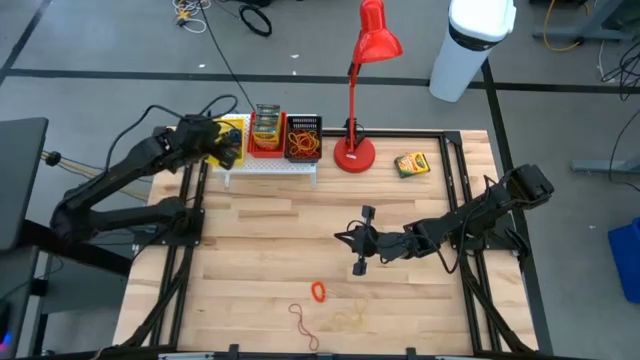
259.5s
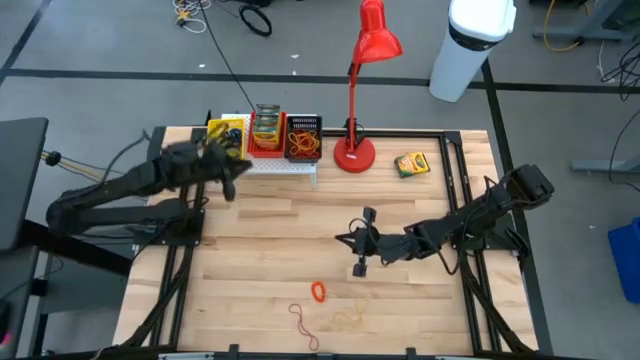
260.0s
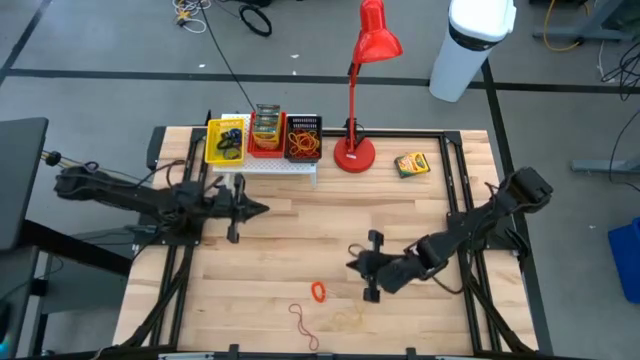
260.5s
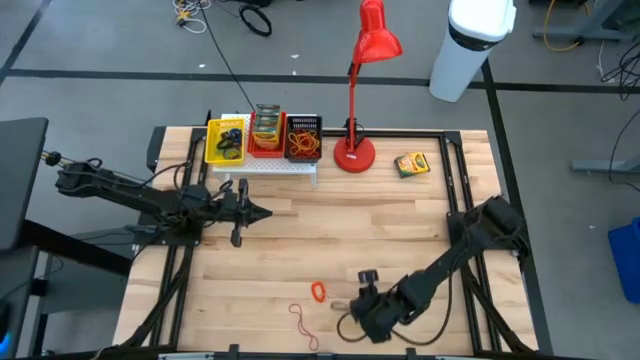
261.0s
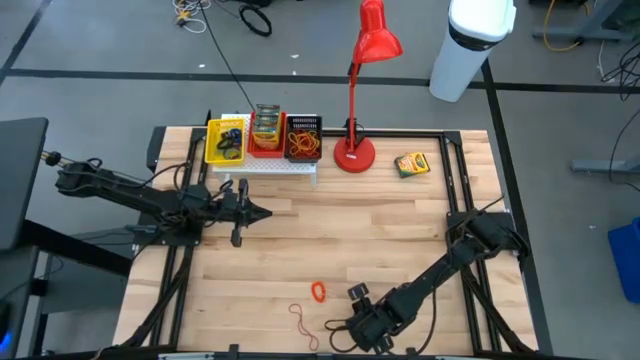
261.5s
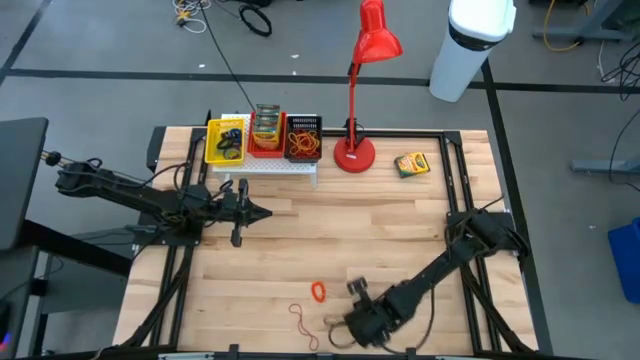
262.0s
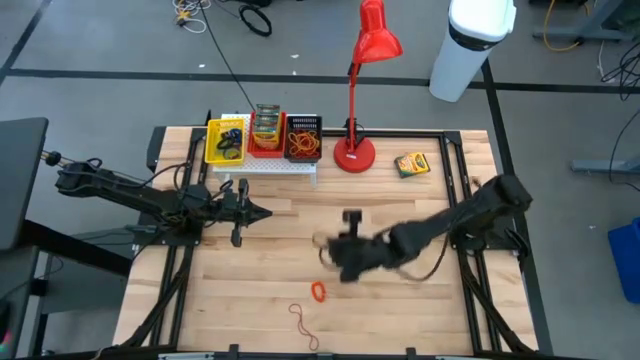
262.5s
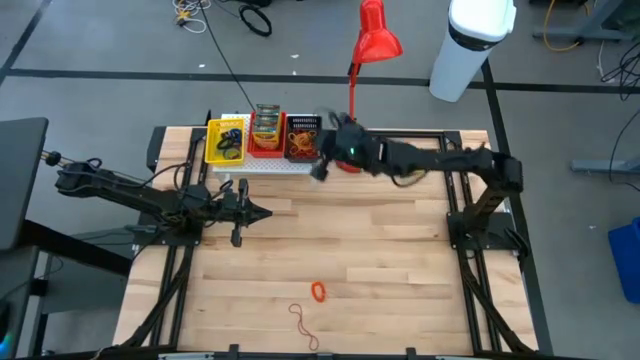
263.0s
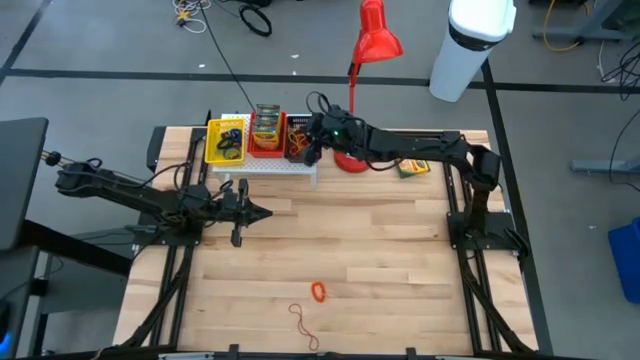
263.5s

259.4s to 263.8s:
Task: Pick & Place Office Desk Supplies
Put the yellow rubber band into the black bin on the shelf

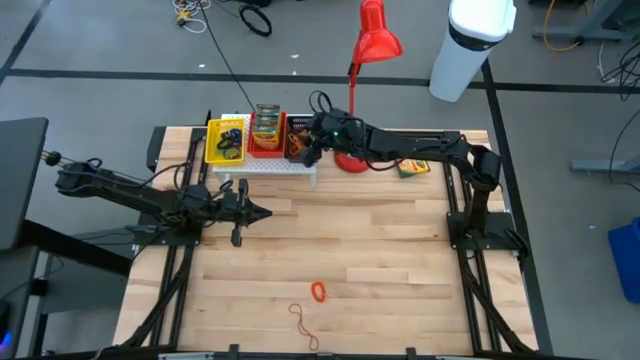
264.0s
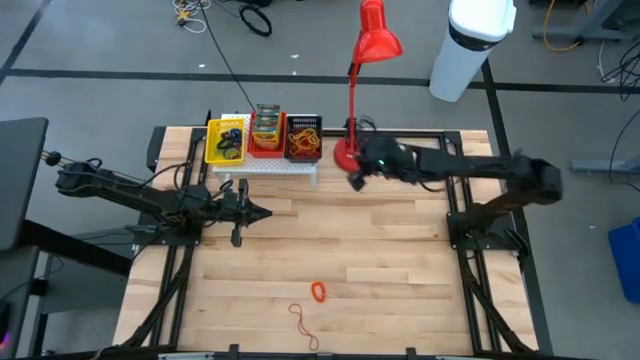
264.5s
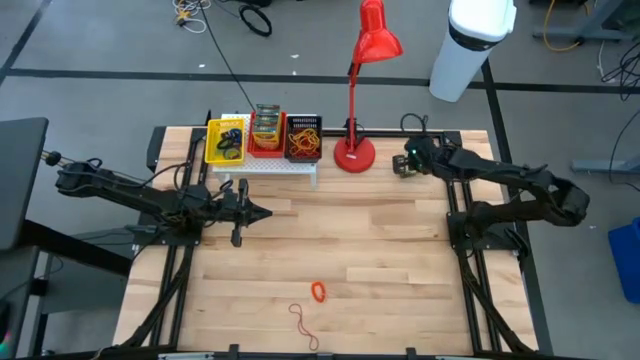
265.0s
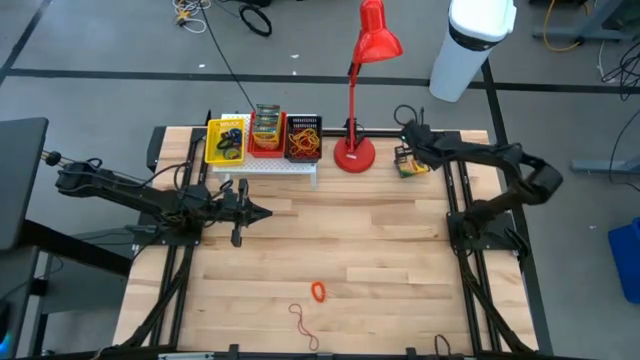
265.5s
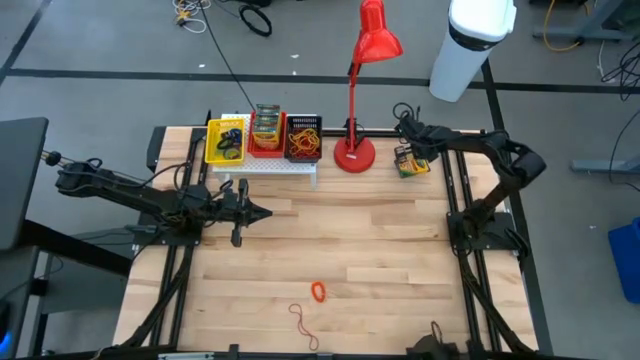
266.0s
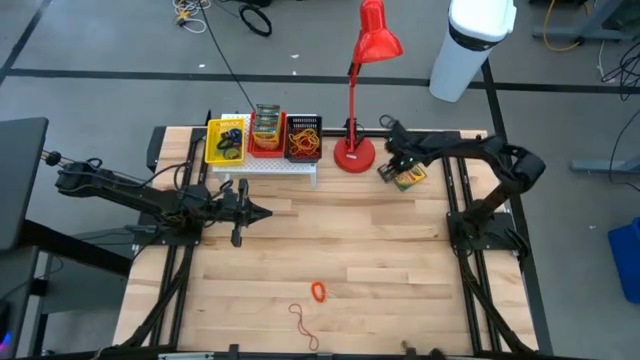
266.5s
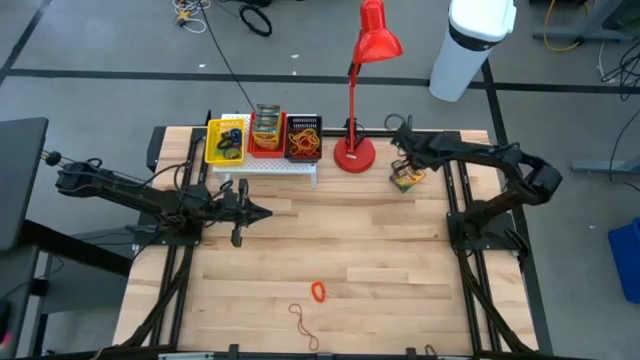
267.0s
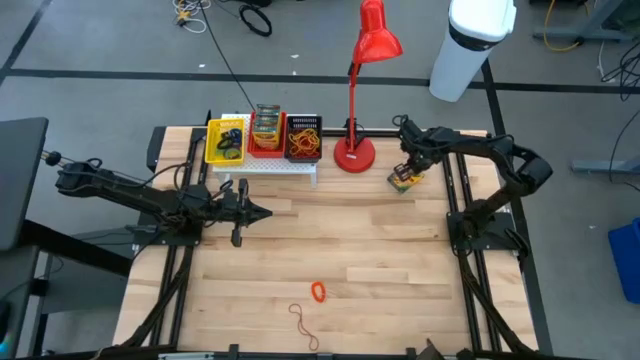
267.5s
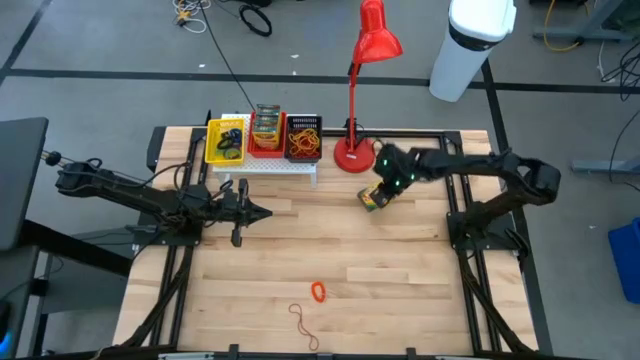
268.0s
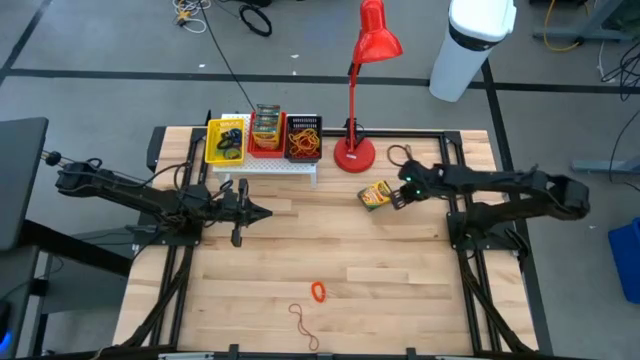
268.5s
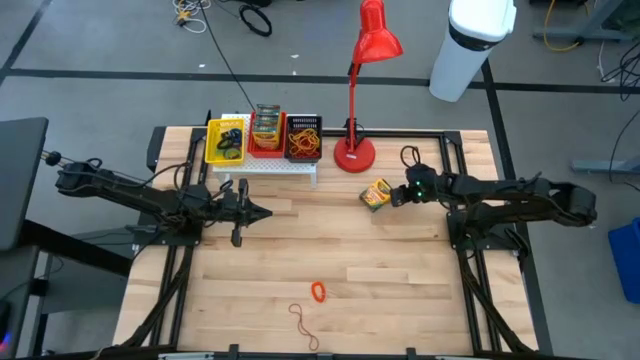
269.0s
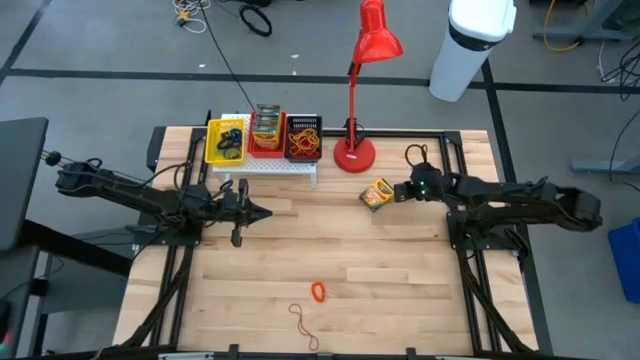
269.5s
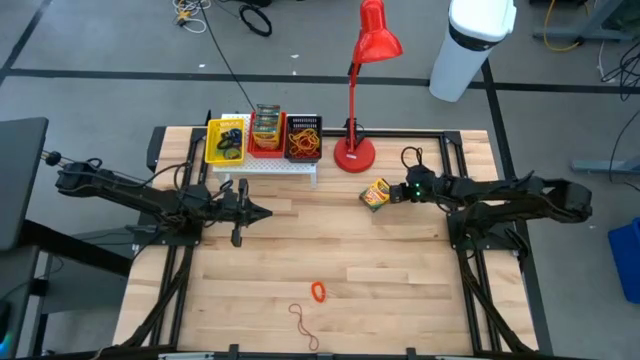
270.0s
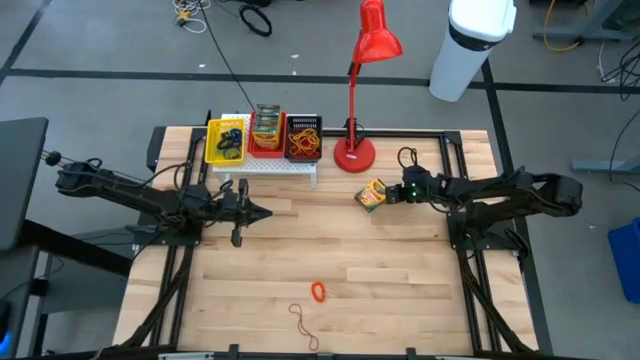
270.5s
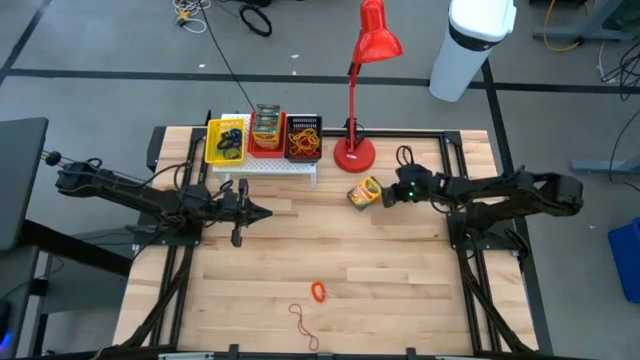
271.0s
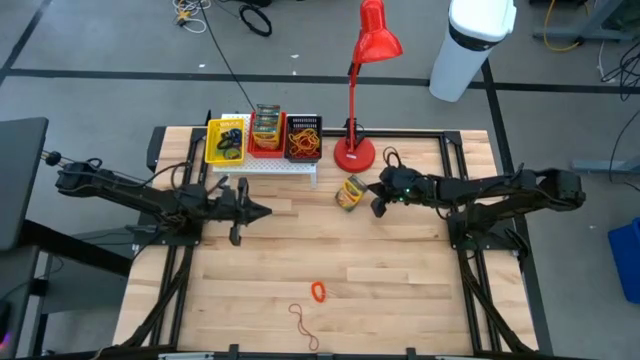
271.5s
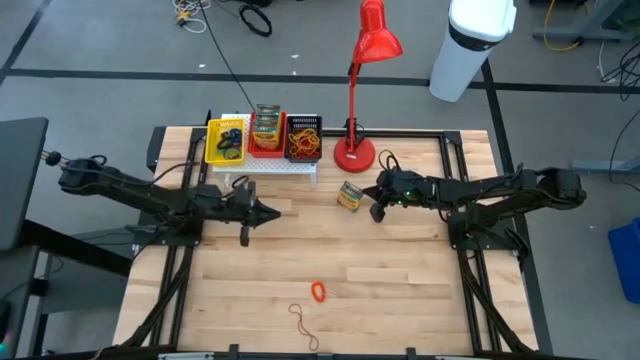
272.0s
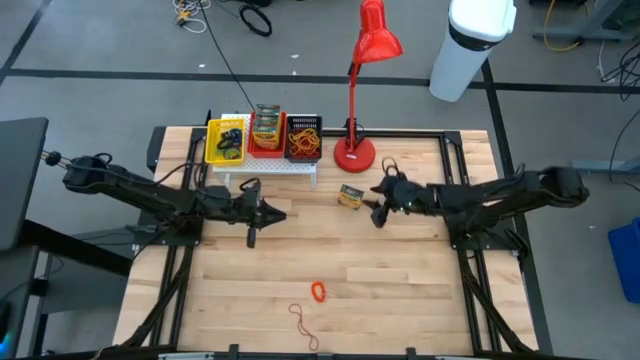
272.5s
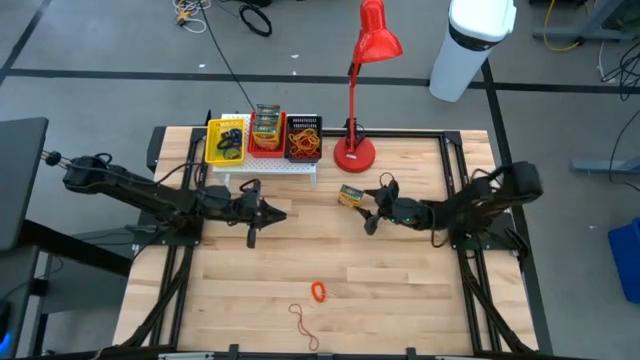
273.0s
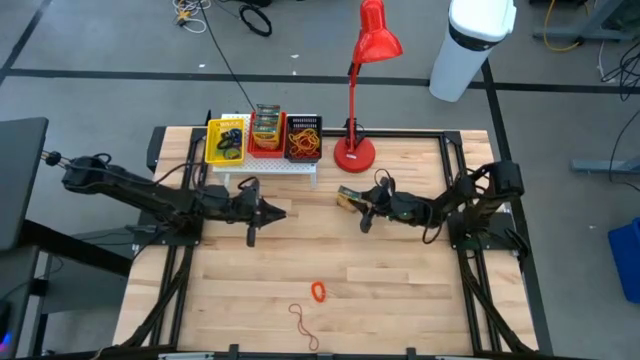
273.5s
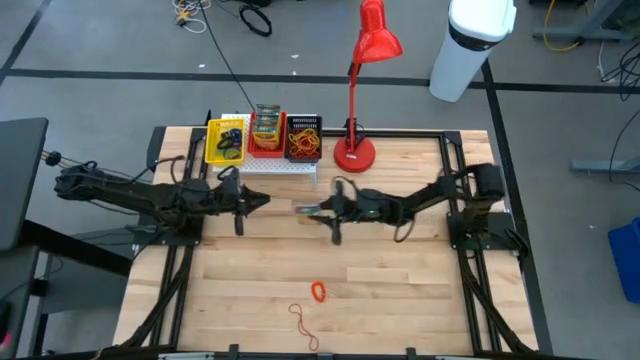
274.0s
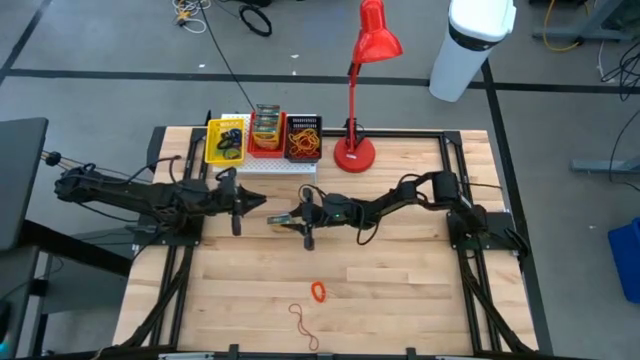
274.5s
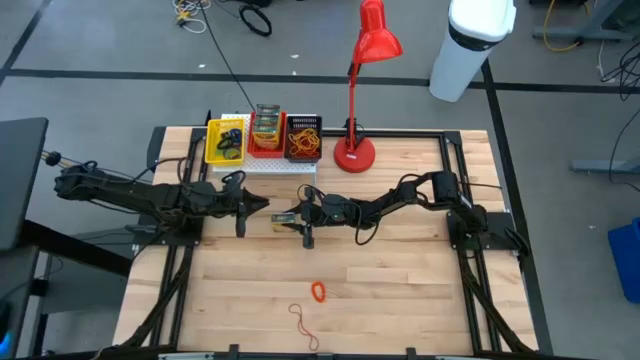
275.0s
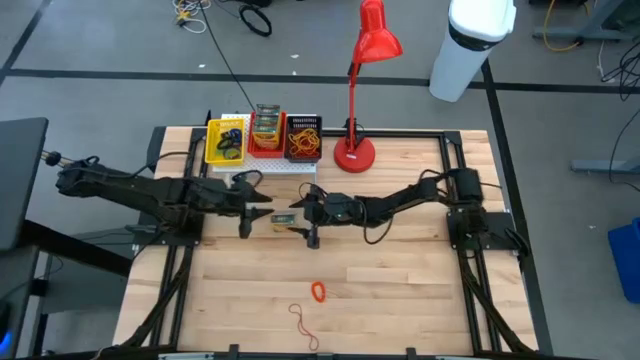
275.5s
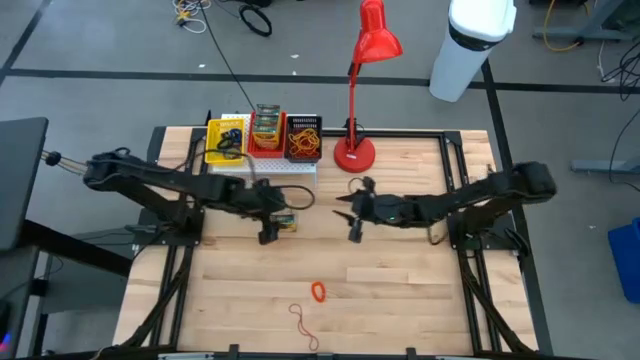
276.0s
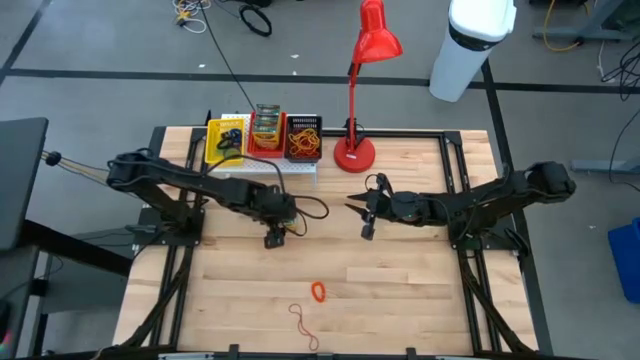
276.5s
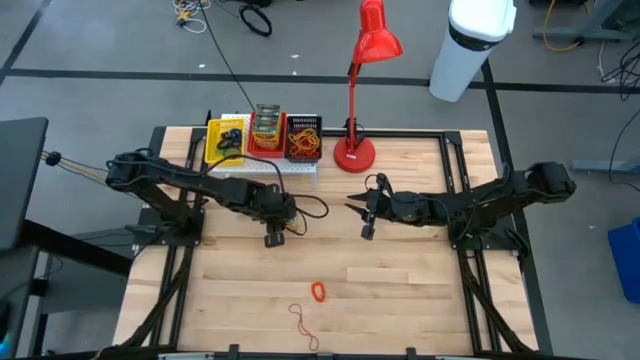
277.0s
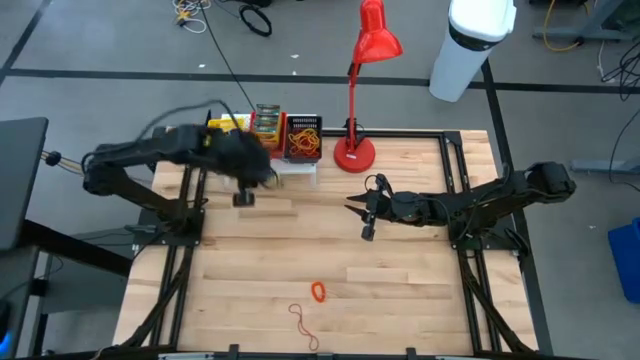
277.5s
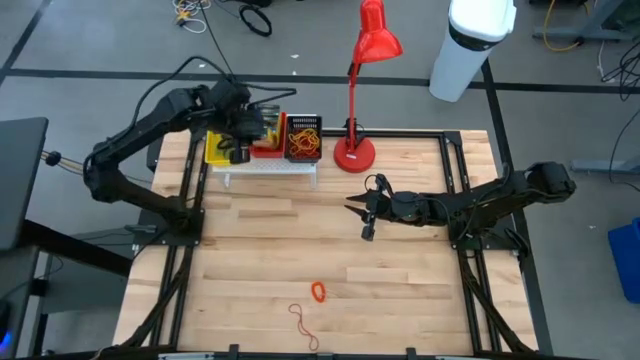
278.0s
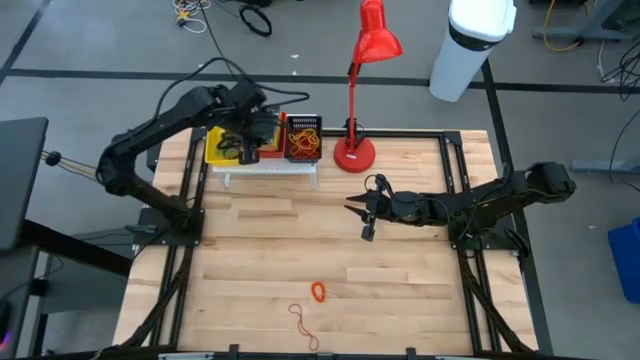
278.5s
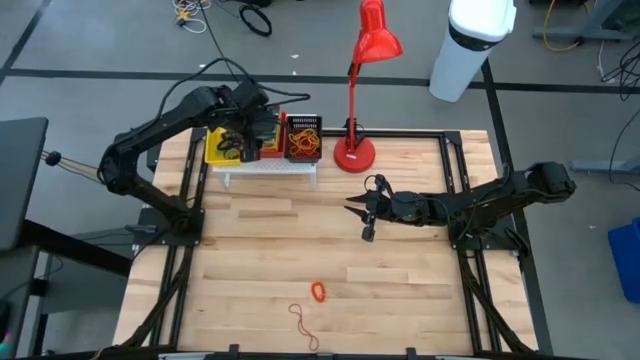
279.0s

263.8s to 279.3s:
Put the crayon box into the red bin on the shelf

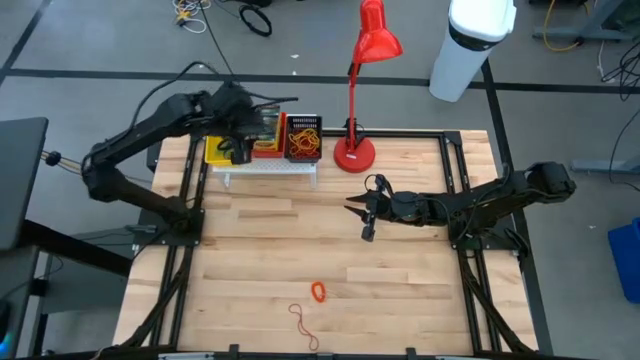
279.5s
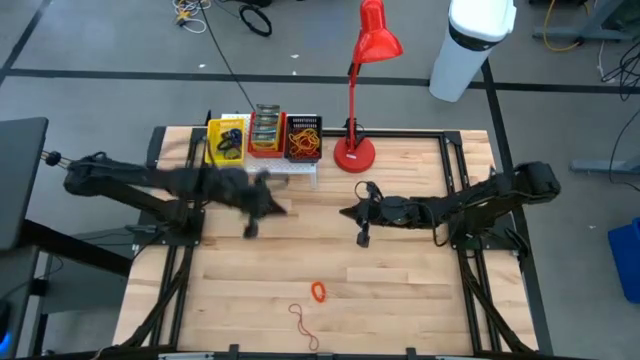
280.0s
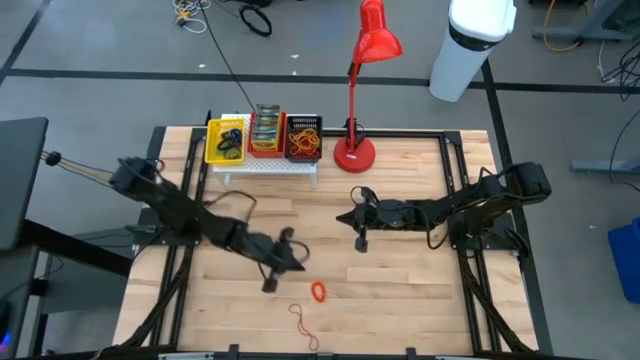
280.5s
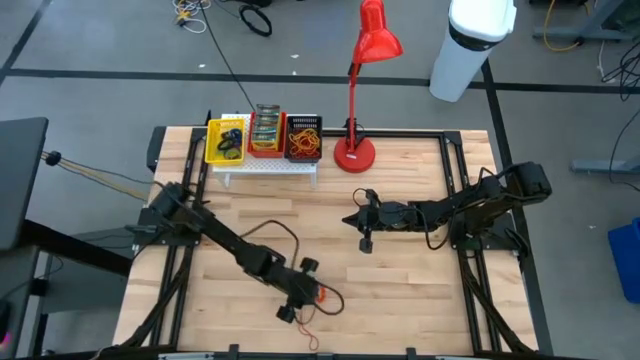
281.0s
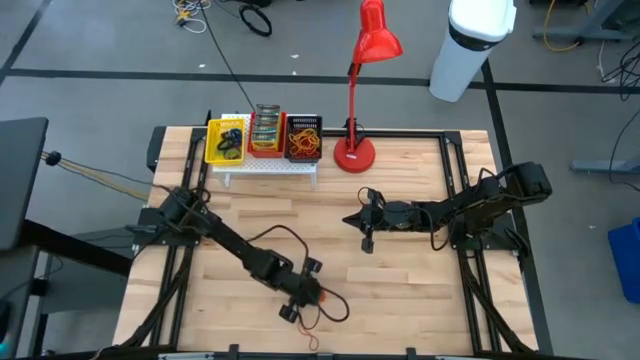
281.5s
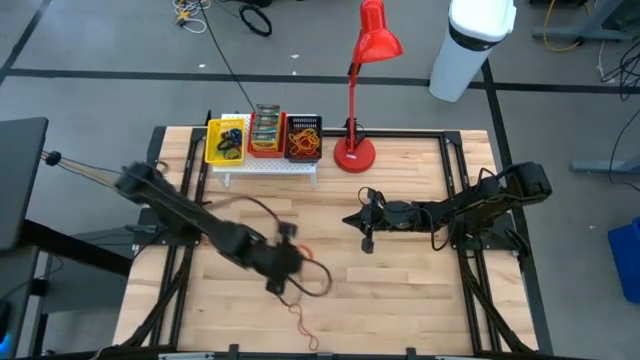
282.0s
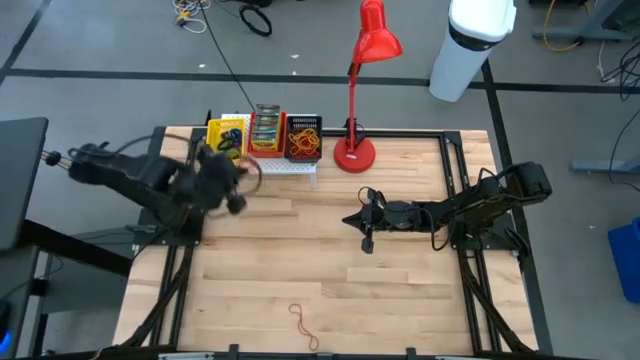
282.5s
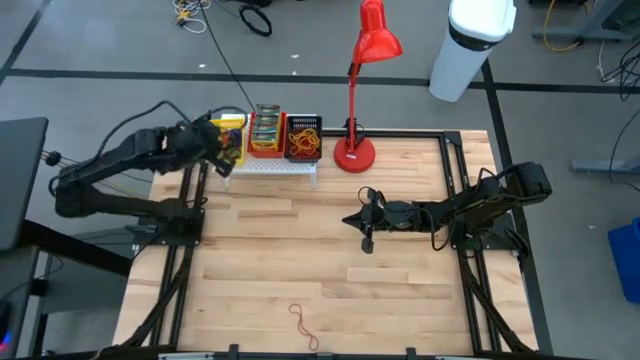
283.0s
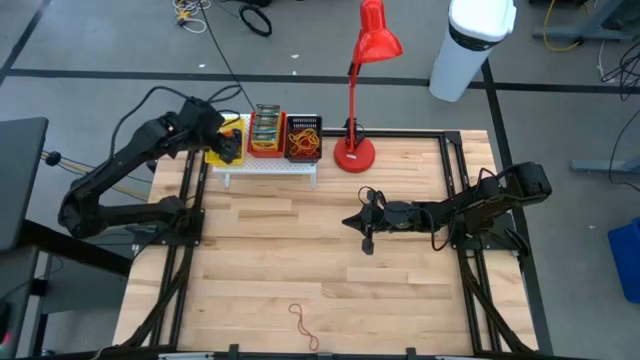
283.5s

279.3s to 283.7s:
Put the orange spring rubber band into the yellow bin on the shelf
